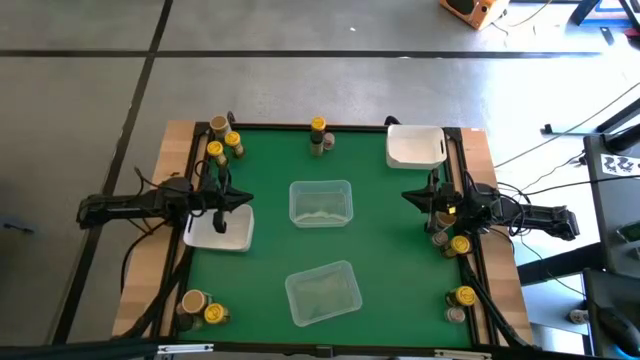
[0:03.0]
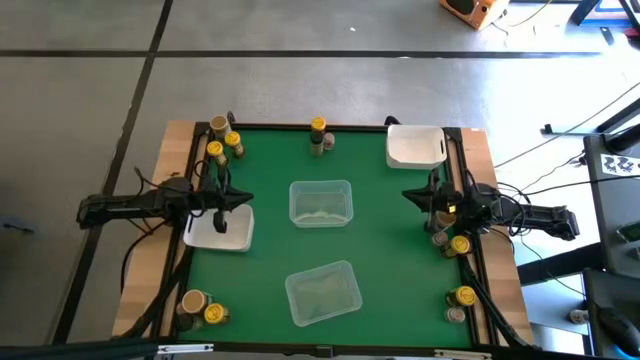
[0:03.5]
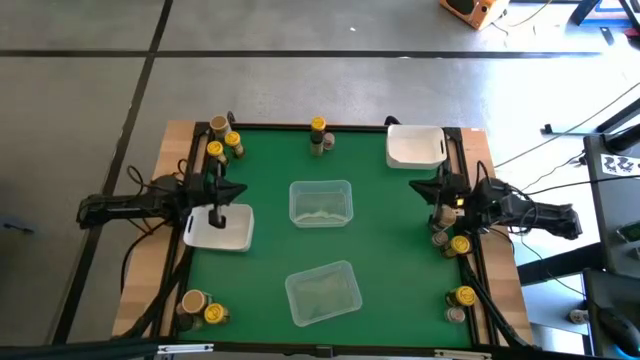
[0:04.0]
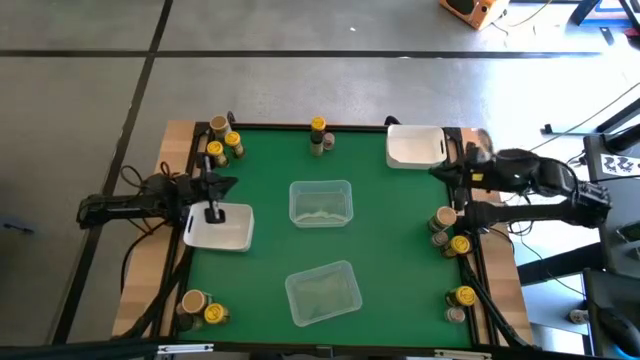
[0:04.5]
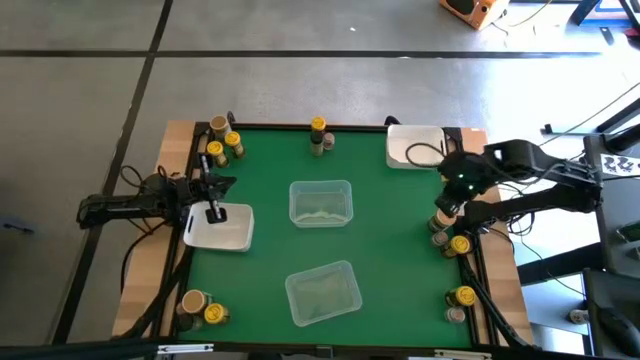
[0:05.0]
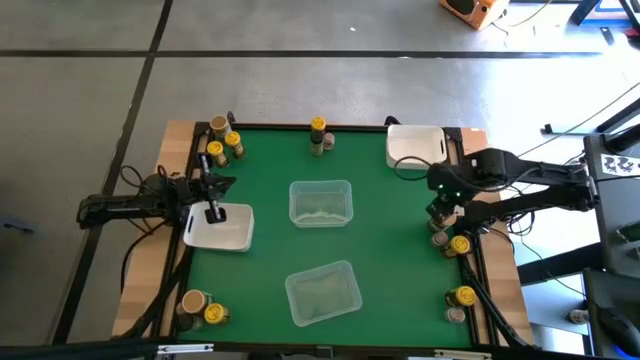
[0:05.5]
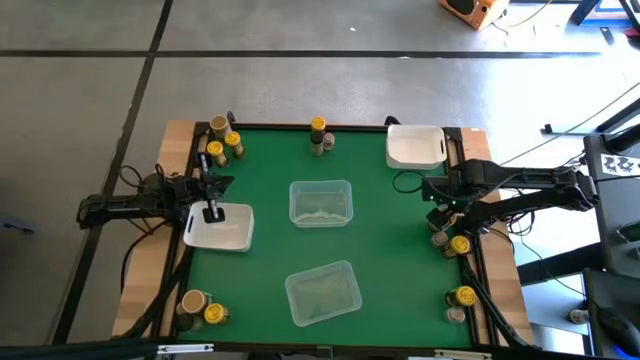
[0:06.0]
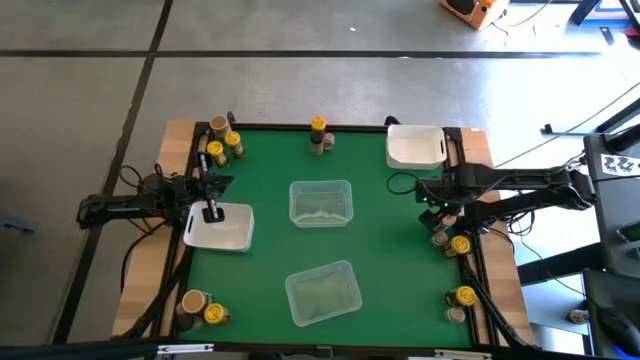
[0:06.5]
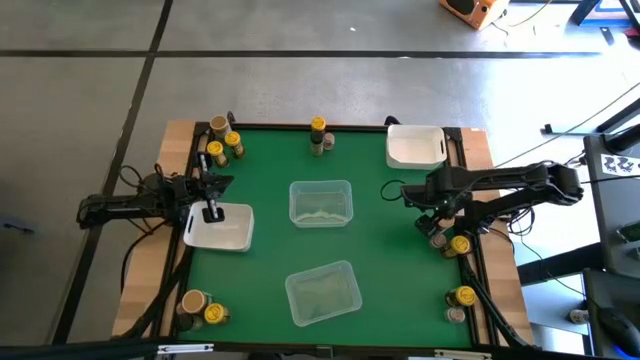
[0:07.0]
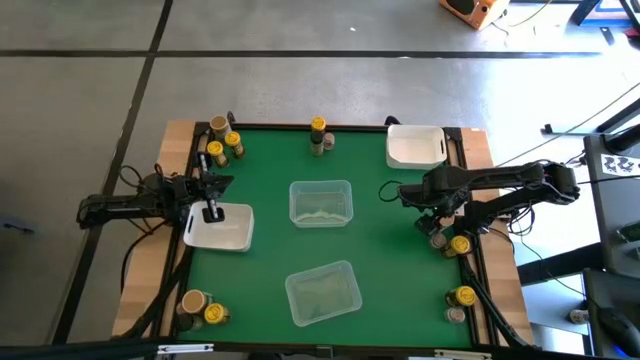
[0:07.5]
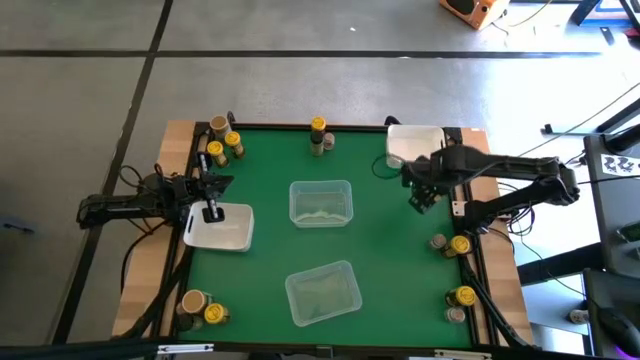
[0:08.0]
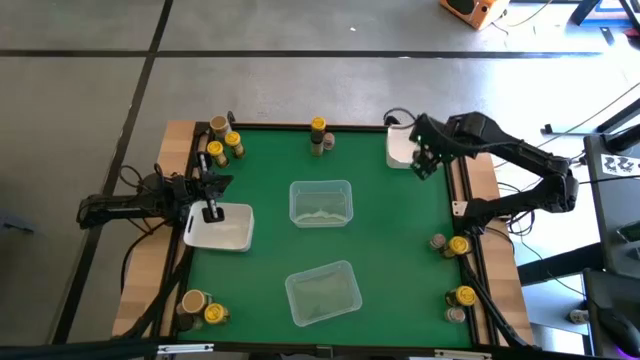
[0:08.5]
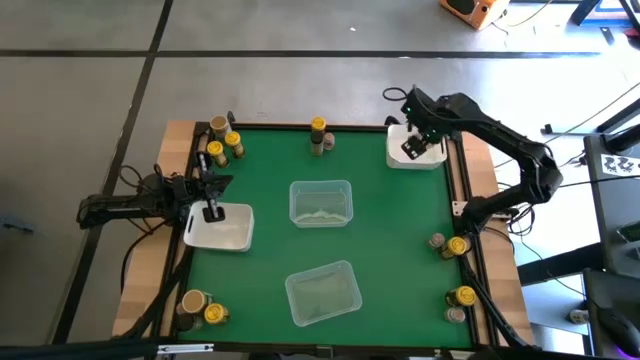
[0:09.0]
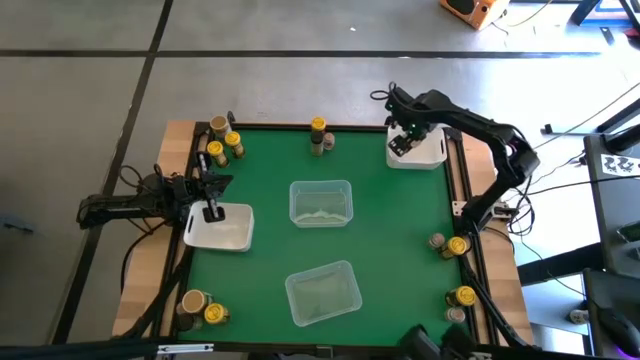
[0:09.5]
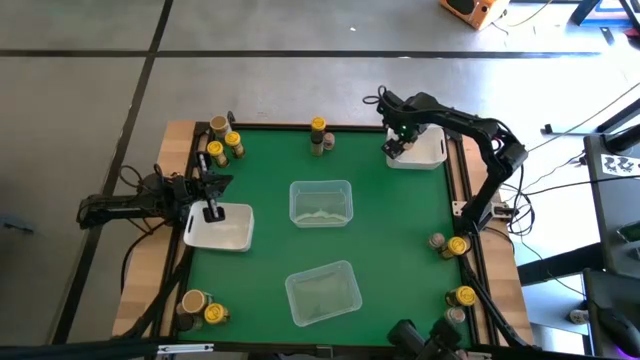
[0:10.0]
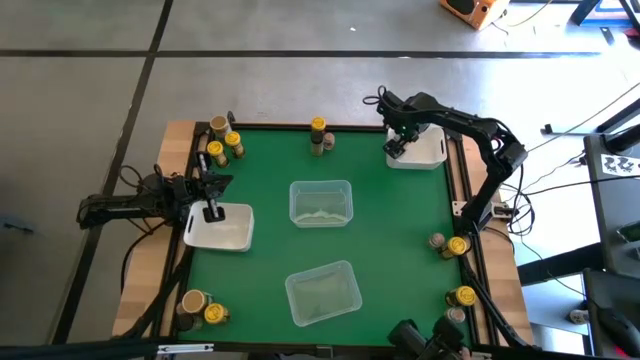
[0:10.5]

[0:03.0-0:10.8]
Task: Sort spices by type
Put the golden spice bottle into the top white bin

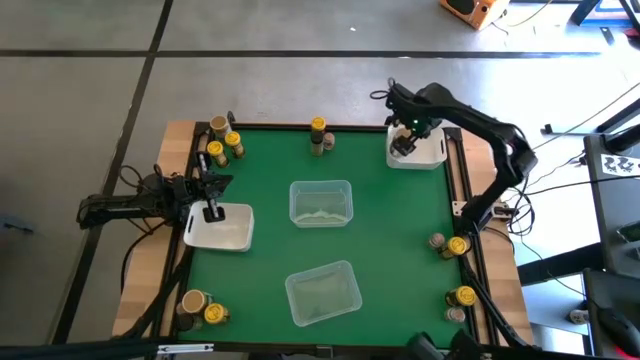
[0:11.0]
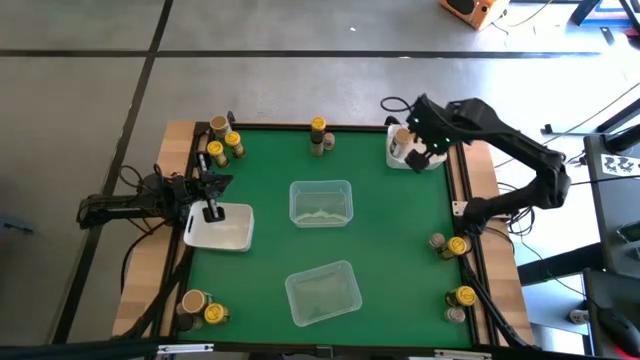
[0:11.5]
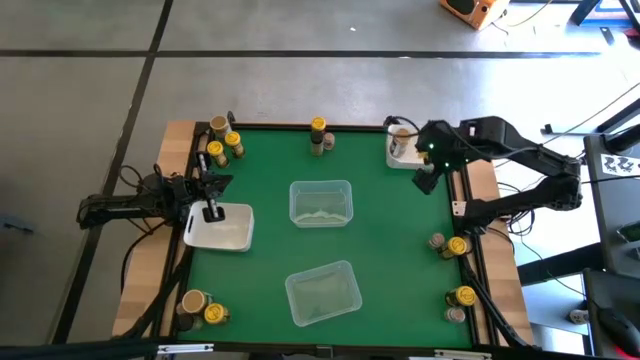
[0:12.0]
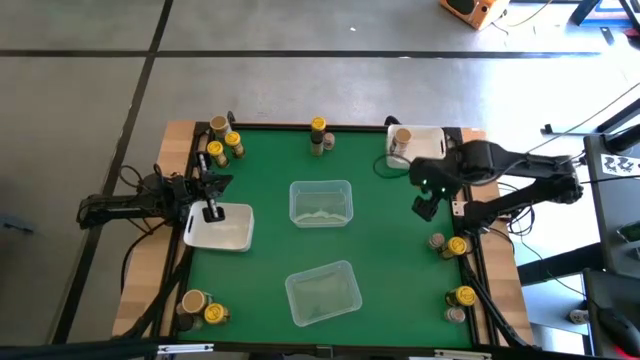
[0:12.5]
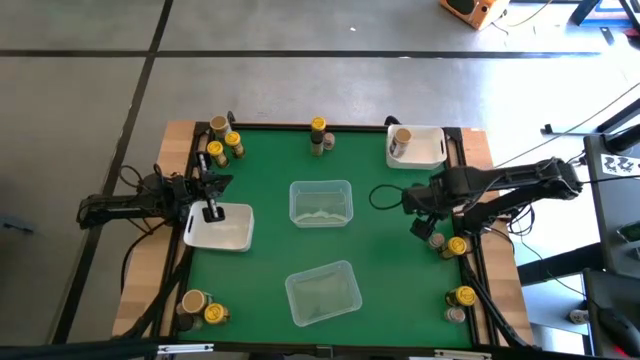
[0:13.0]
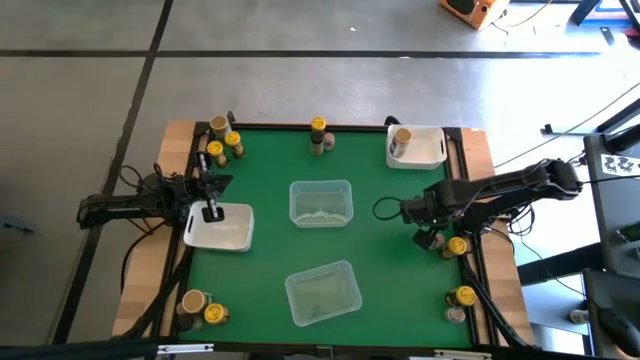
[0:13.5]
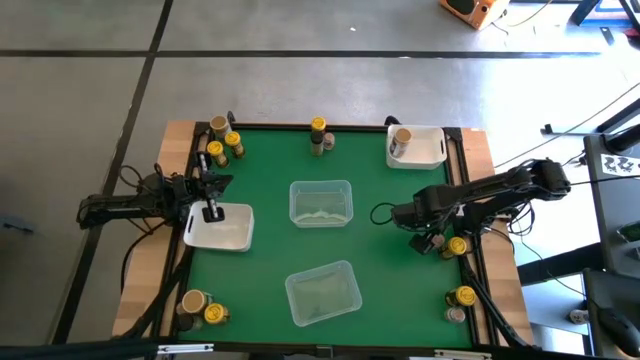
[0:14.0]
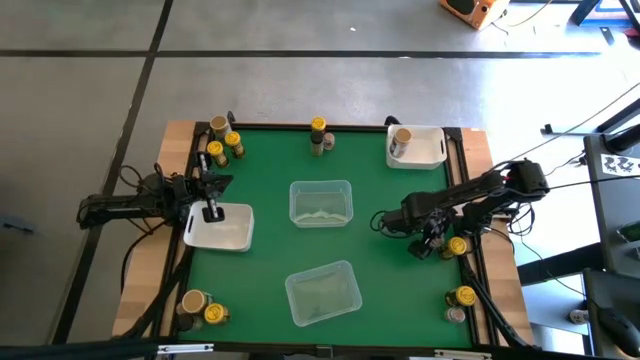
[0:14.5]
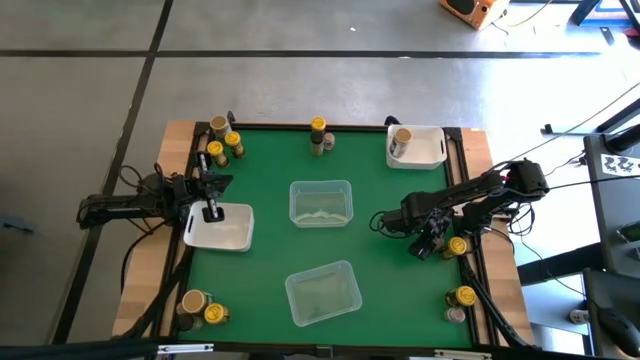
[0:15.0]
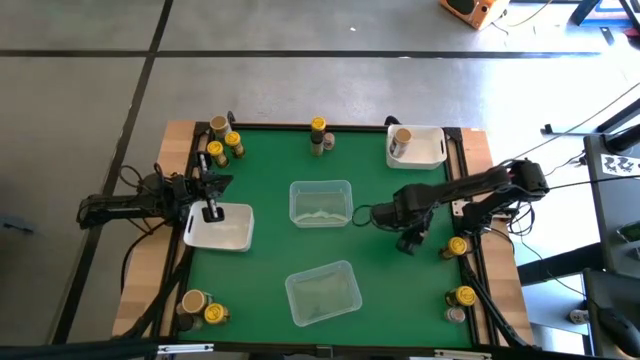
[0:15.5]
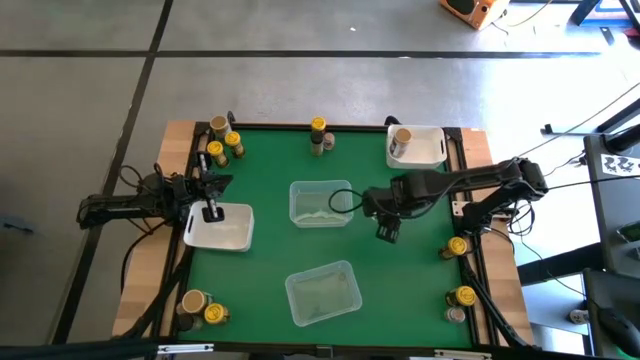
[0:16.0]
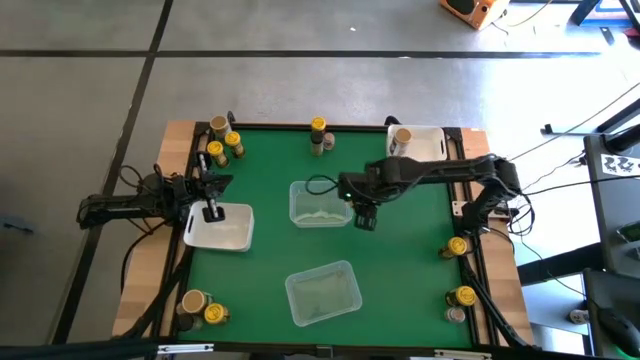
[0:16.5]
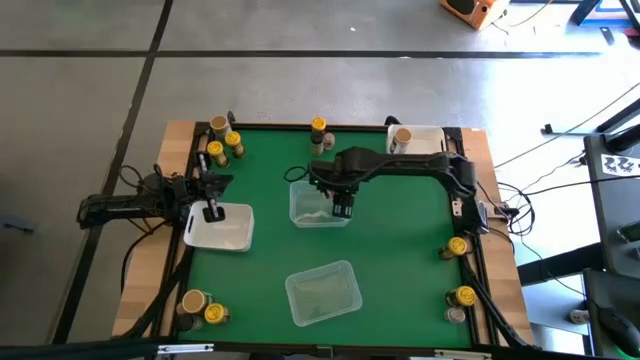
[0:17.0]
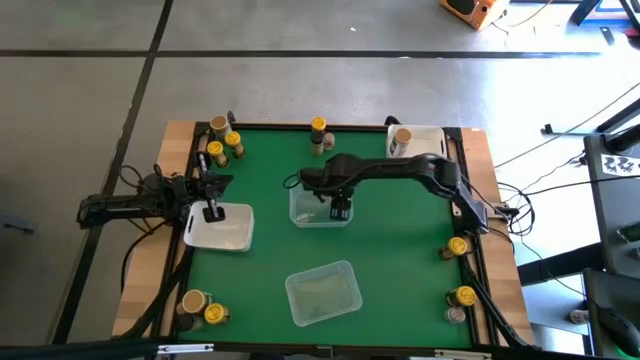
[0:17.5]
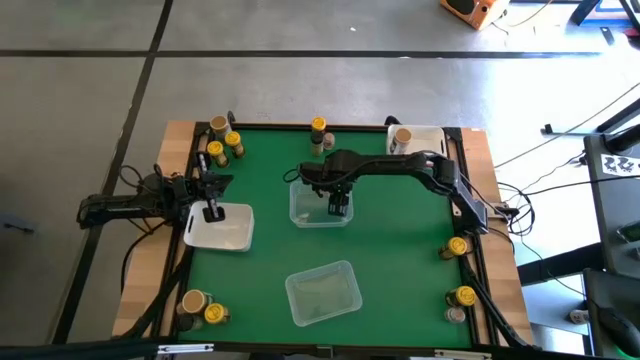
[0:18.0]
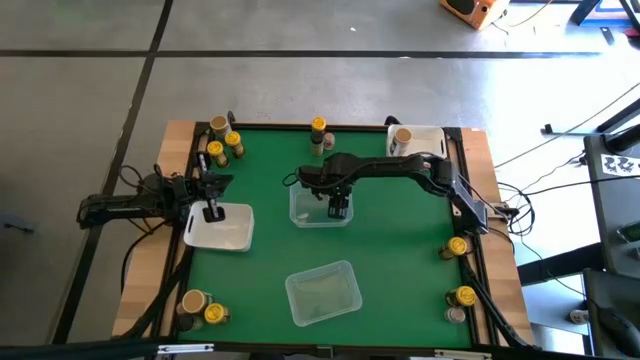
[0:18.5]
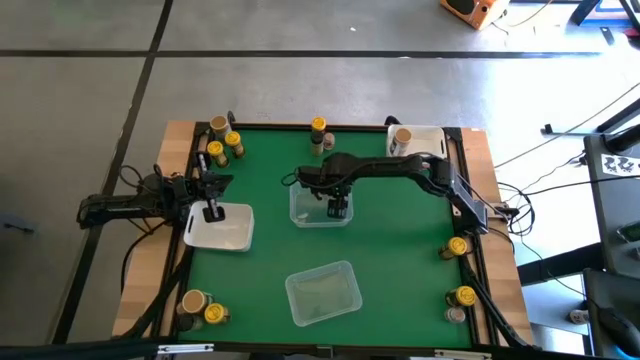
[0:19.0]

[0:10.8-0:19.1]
Put the brown spice bottle into the bottom transparent bin

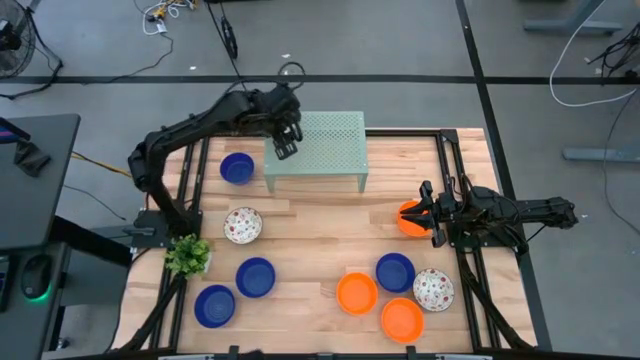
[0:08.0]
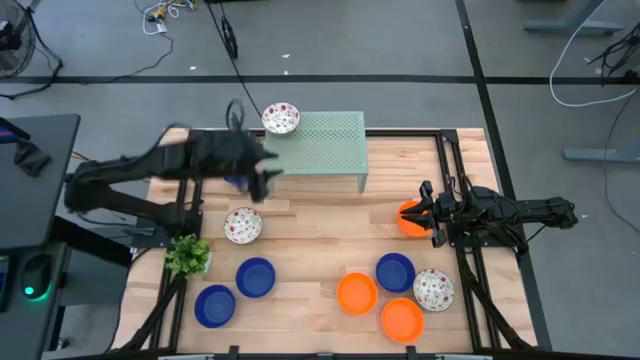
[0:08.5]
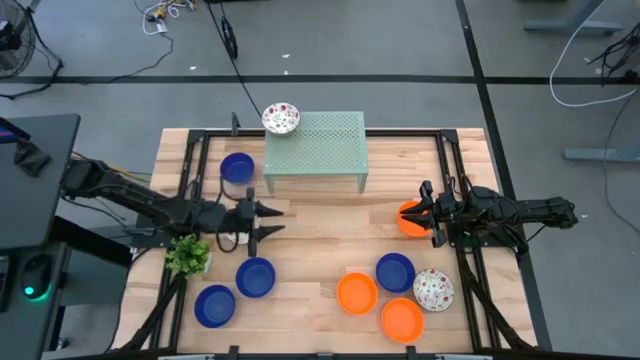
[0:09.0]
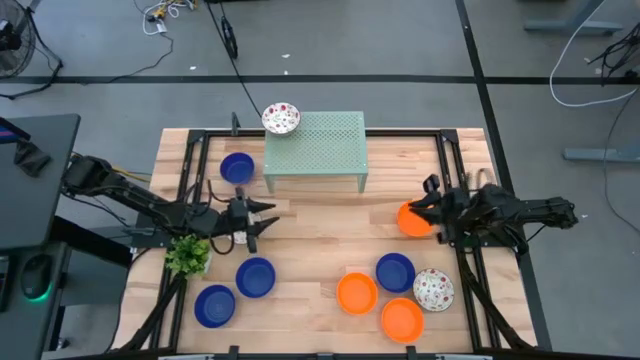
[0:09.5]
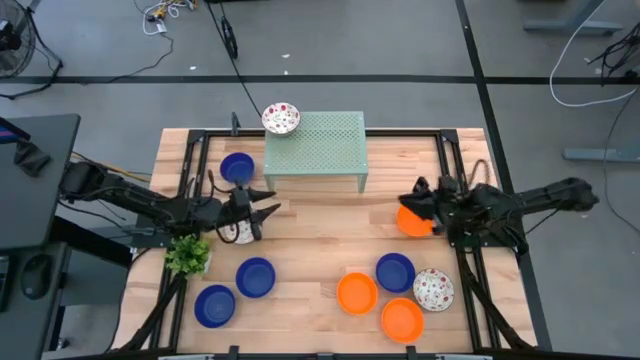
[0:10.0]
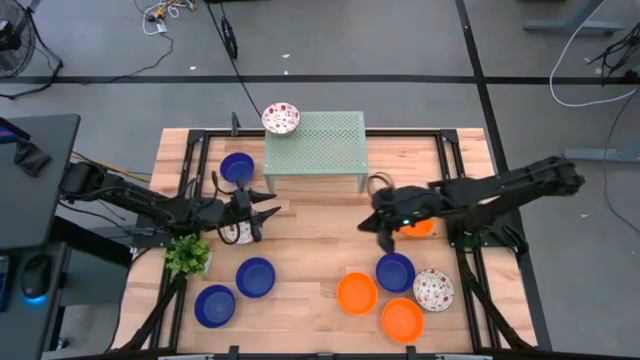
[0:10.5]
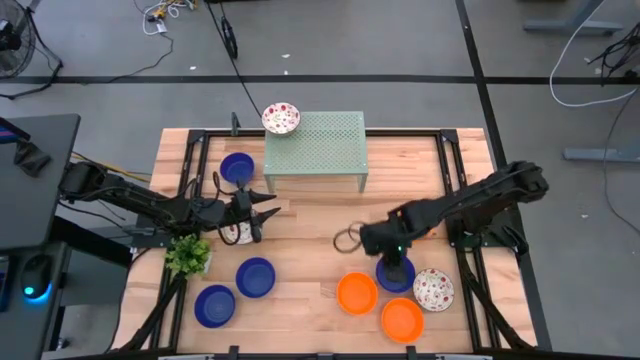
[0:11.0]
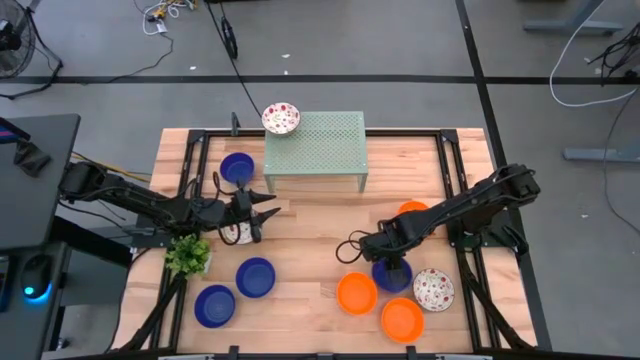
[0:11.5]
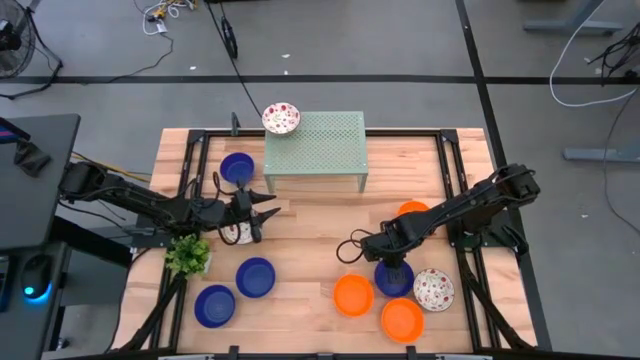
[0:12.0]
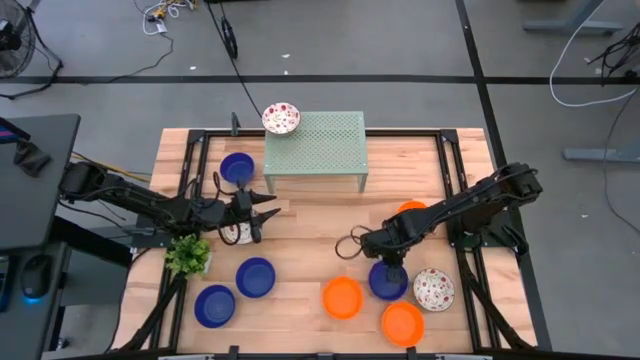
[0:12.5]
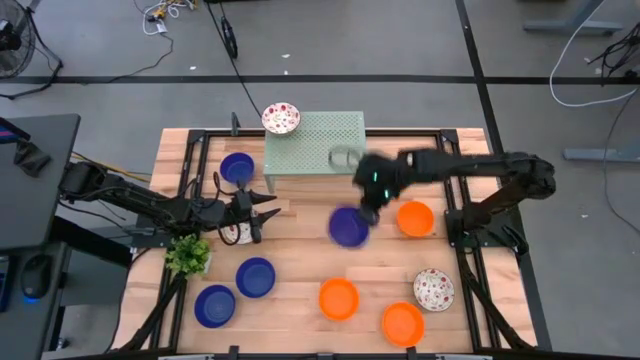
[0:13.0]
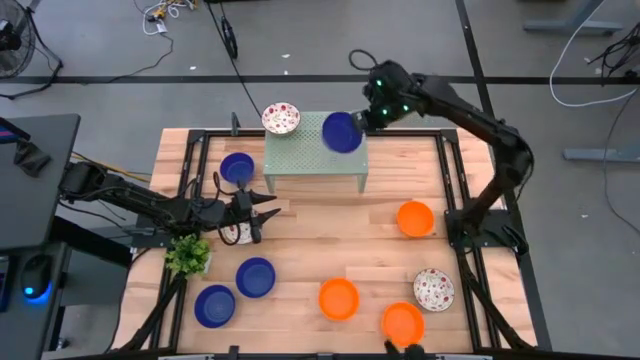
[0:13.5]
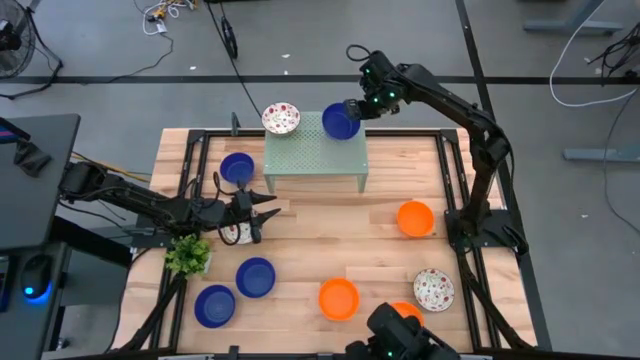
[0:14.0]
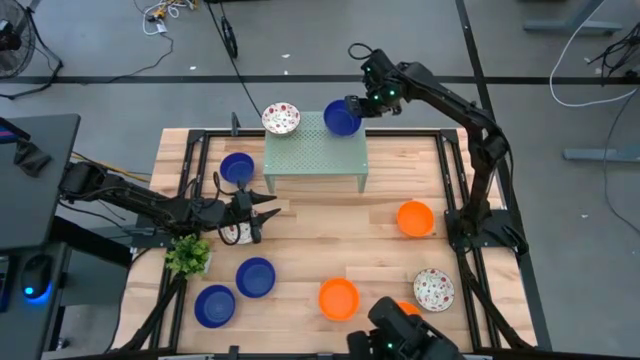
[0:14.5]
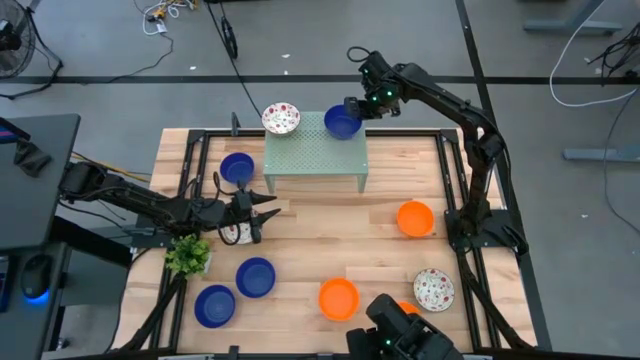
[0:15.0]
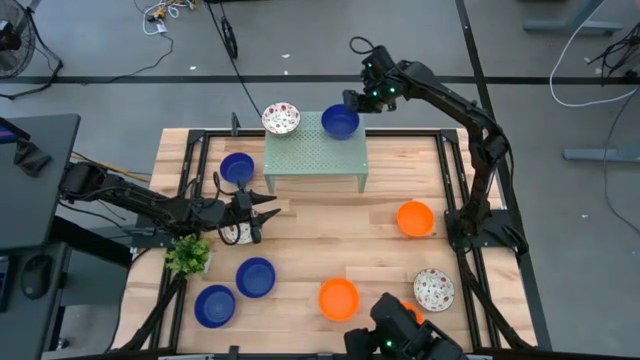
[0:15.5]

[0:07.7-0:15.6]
Task: Pick & Place Mini bowls
Put the blue bowl on the shelf
